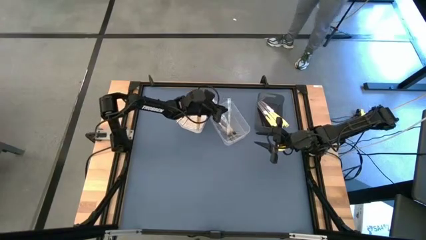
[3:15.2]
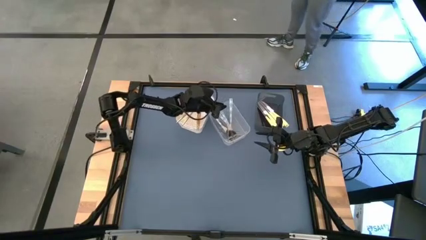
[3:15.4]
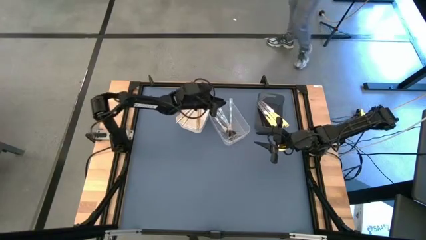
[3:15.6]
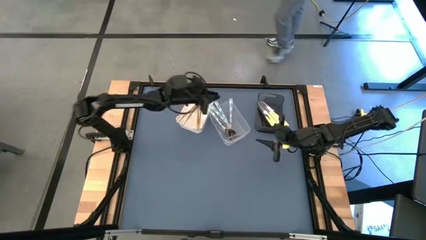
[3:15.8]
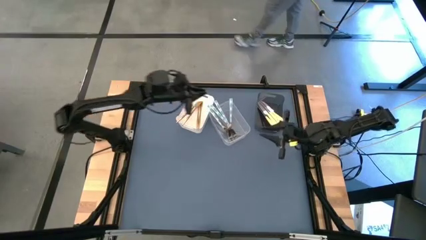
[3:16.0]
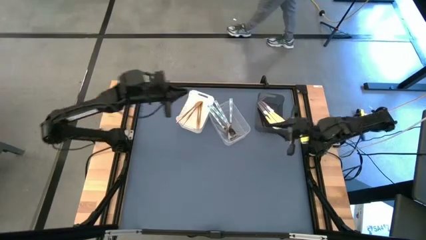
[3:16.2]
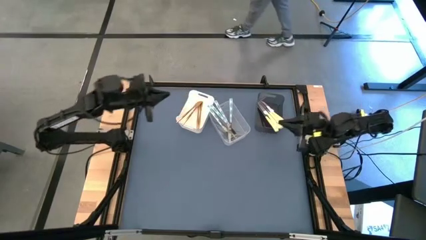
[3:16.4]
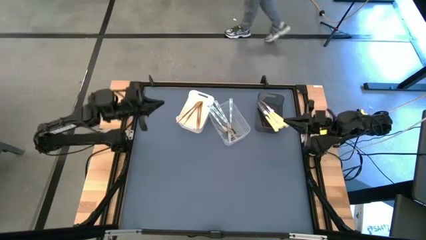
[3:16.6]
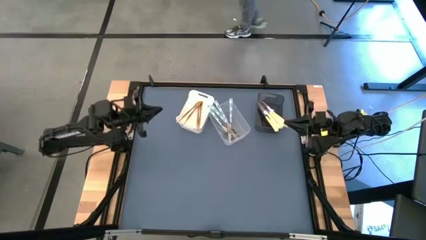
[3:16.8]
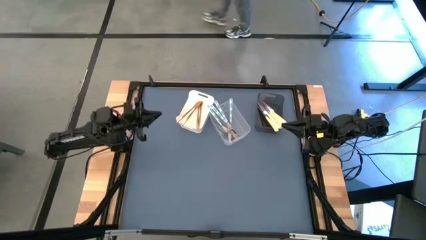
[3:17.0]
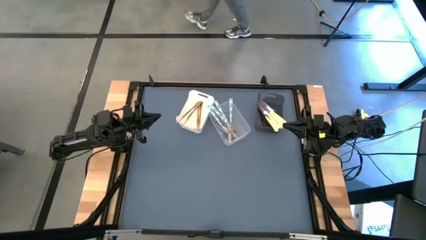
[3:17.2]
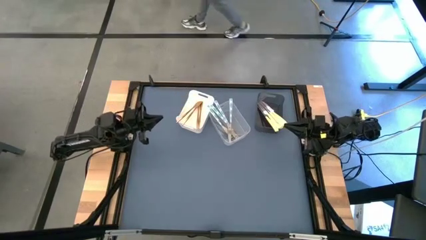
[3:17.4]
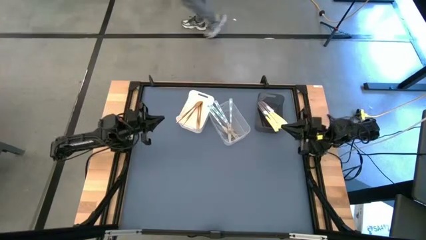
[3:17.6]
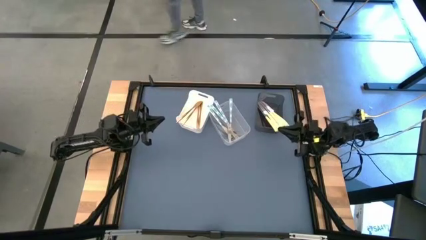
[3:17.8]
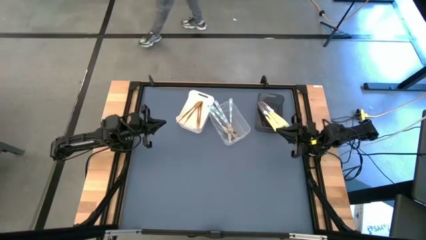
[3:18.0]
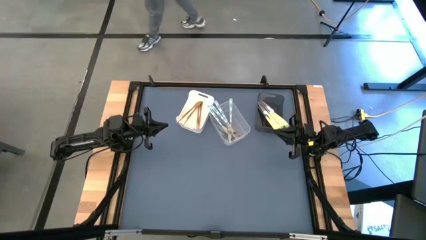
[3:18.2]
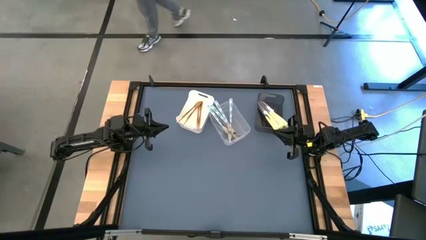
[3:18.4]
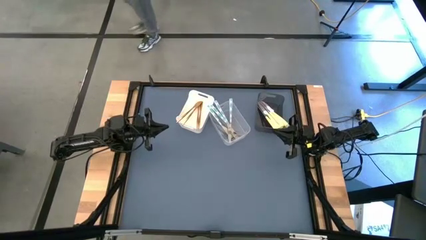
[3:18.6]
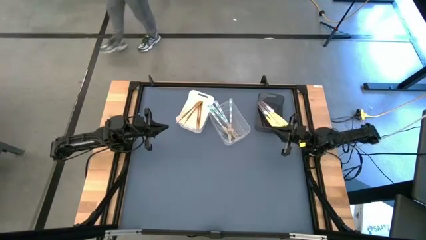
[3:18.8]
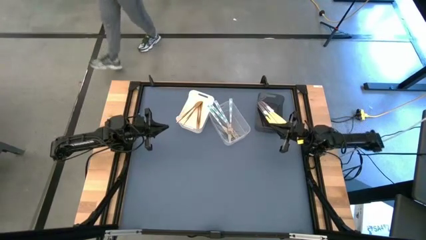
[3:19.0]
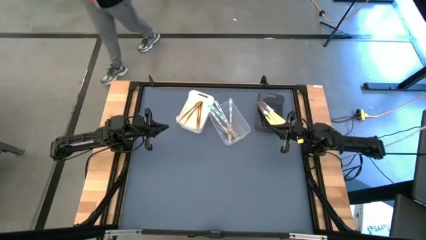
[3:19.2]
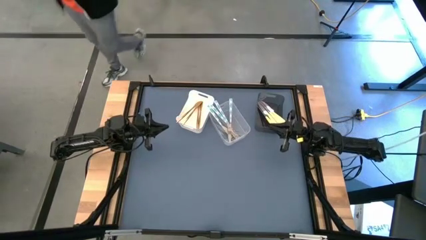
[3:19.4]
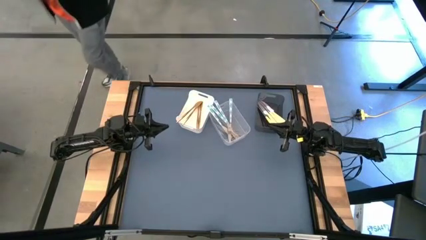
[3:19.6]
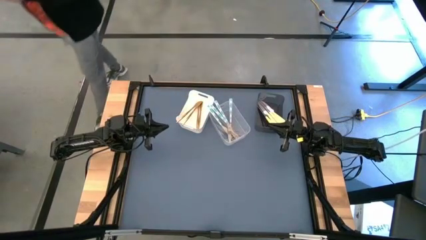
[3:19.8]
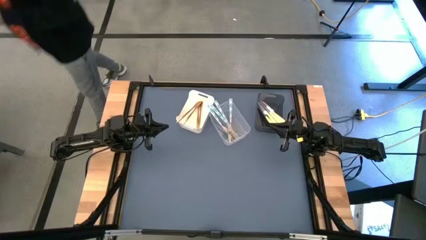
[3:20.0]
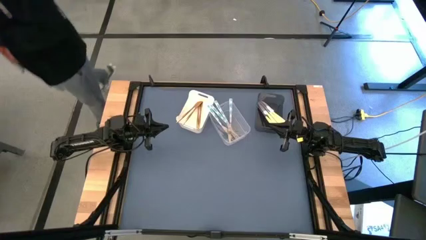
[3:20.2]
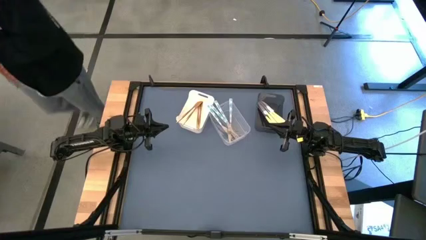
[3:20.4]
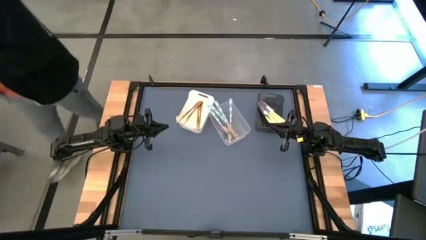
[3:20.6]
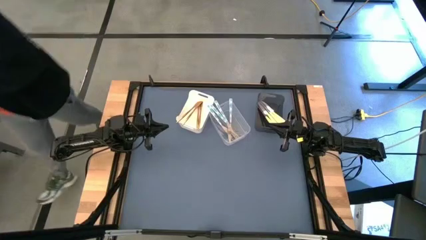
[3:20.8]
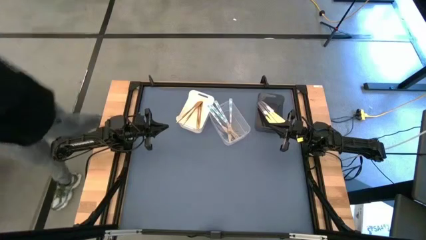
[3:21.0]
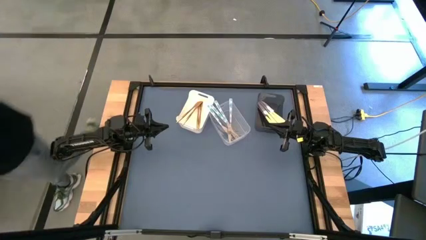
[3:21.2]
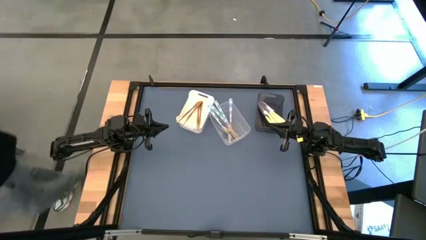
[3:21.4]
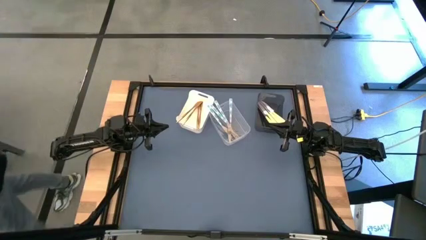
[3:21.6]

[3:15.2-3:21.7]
Task: Sort silverware by color (type)
Return to home position
